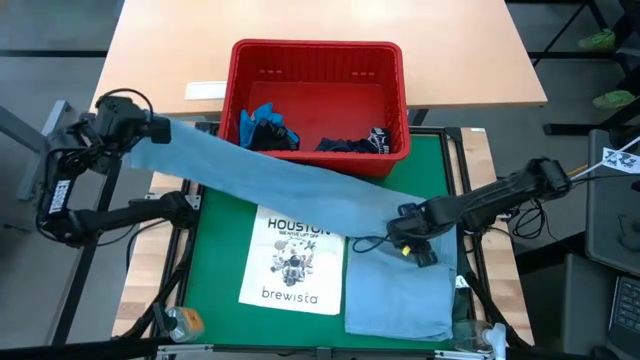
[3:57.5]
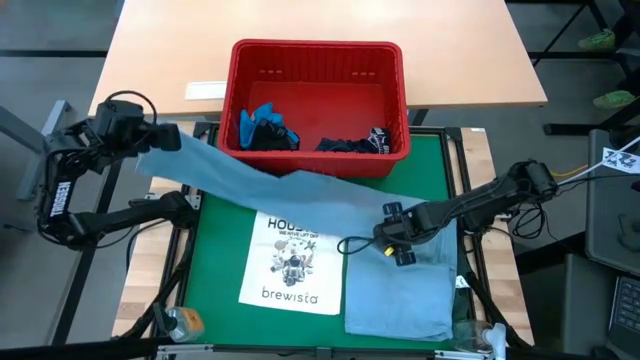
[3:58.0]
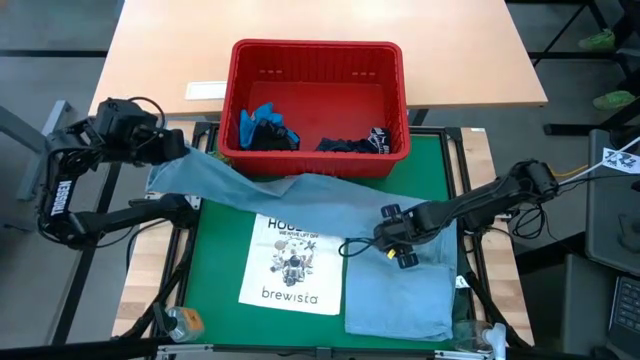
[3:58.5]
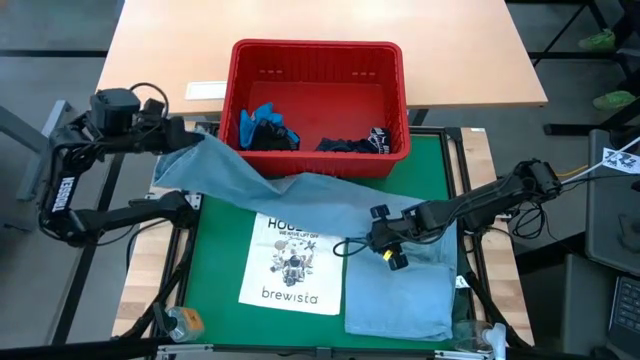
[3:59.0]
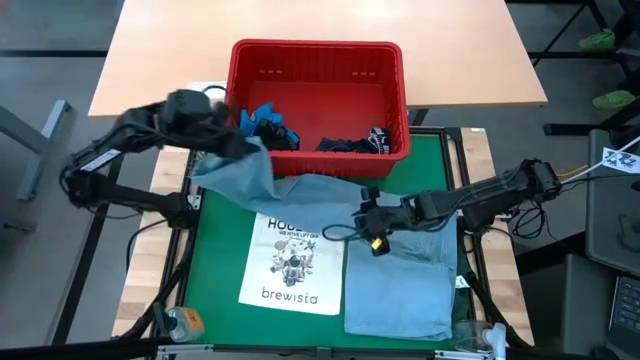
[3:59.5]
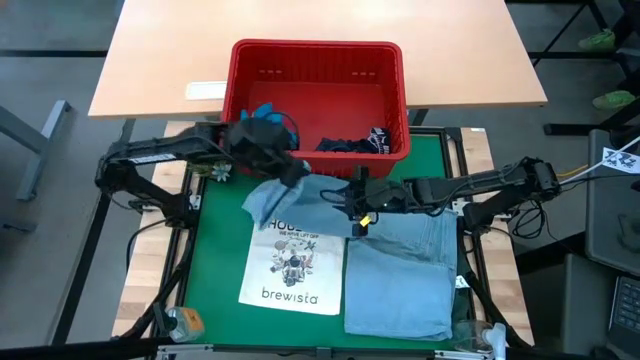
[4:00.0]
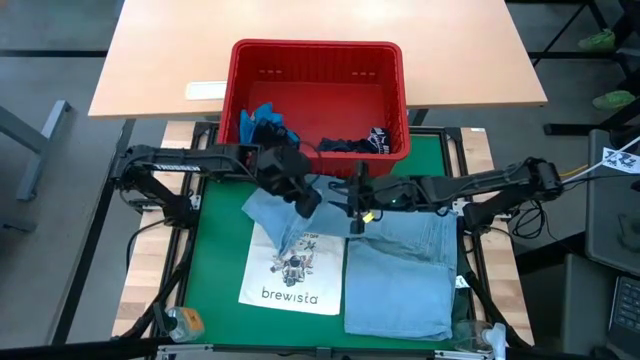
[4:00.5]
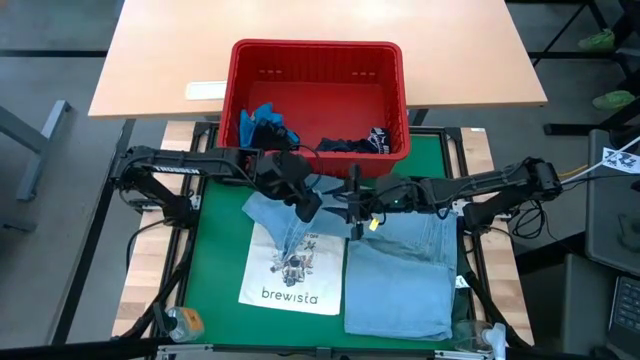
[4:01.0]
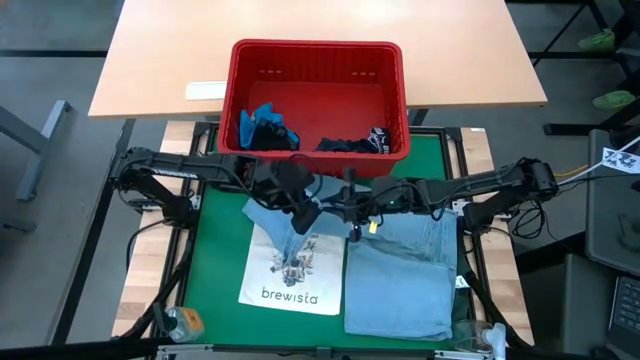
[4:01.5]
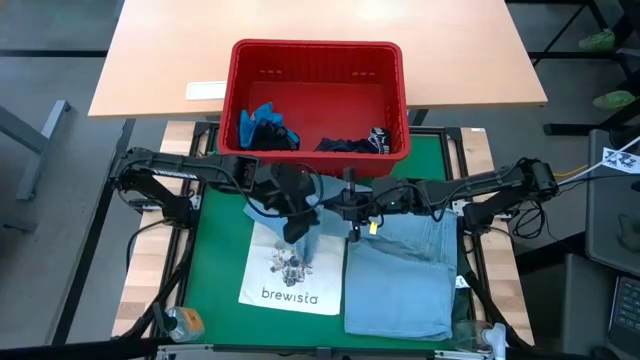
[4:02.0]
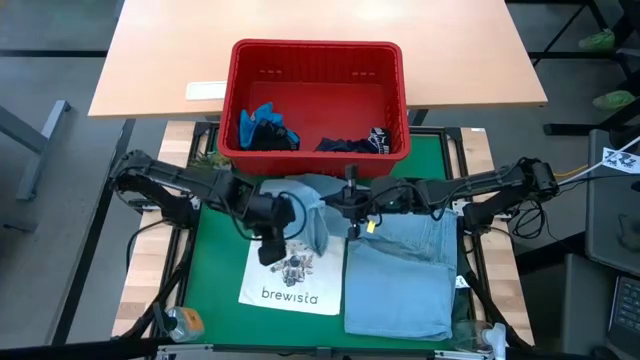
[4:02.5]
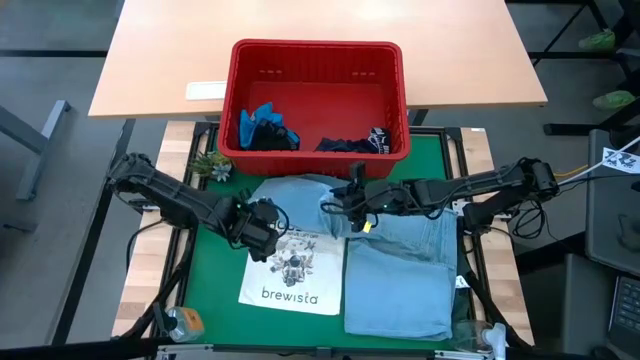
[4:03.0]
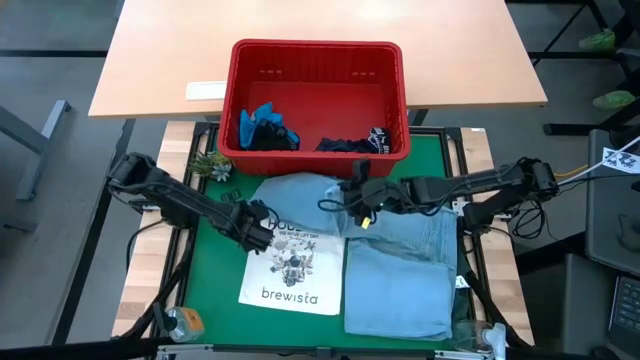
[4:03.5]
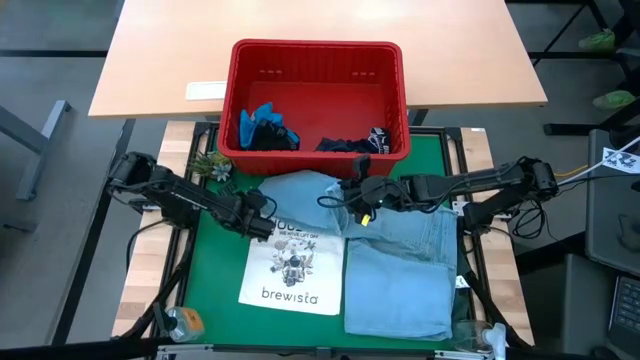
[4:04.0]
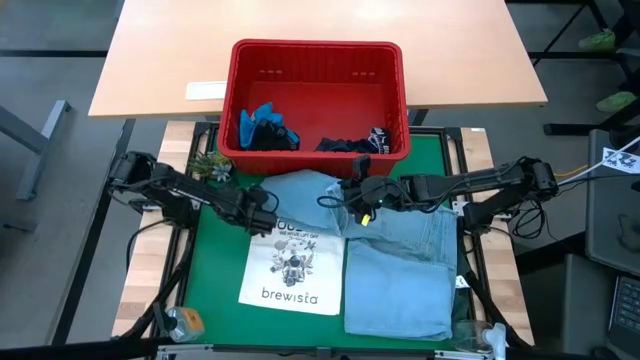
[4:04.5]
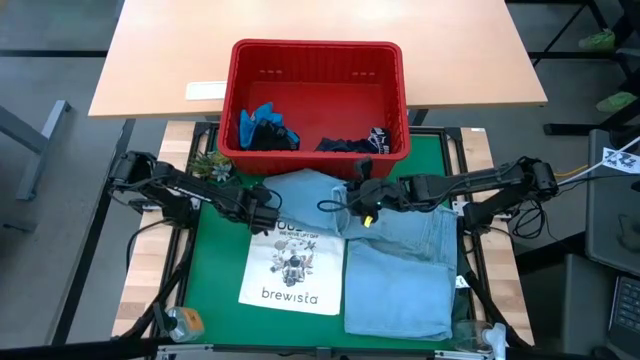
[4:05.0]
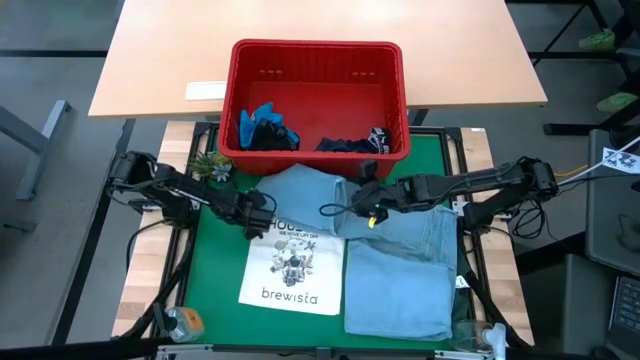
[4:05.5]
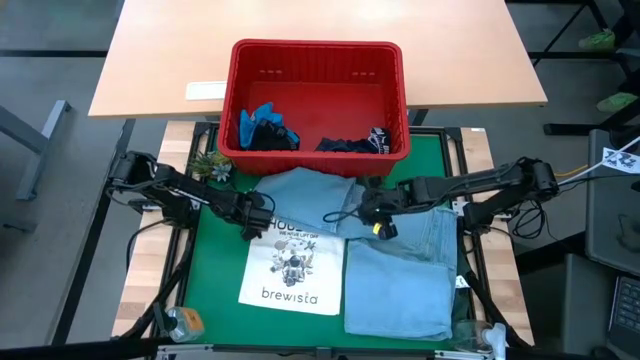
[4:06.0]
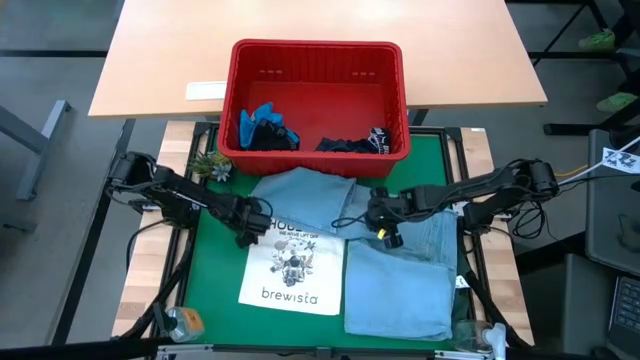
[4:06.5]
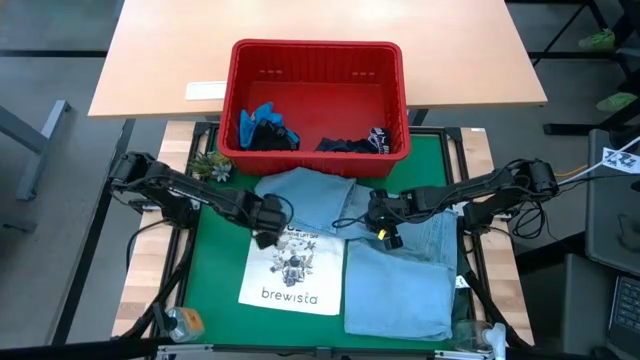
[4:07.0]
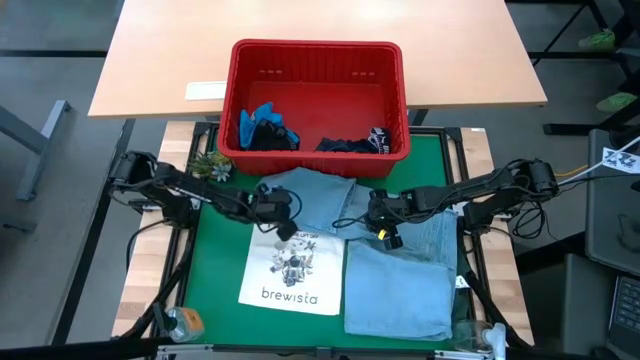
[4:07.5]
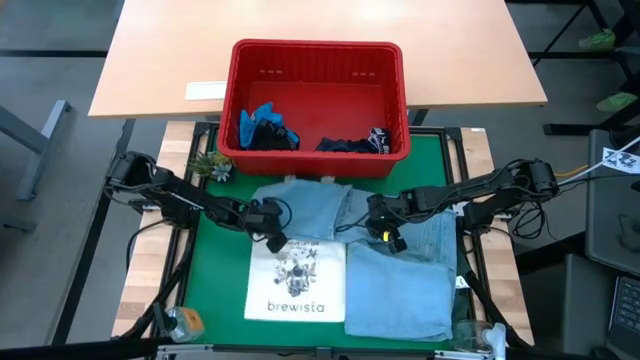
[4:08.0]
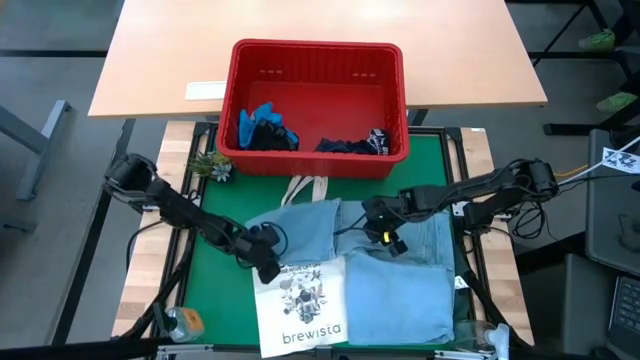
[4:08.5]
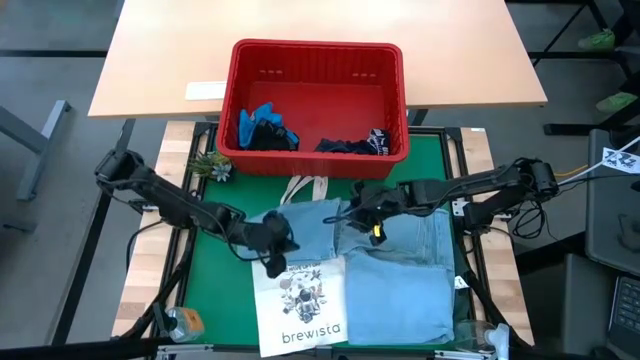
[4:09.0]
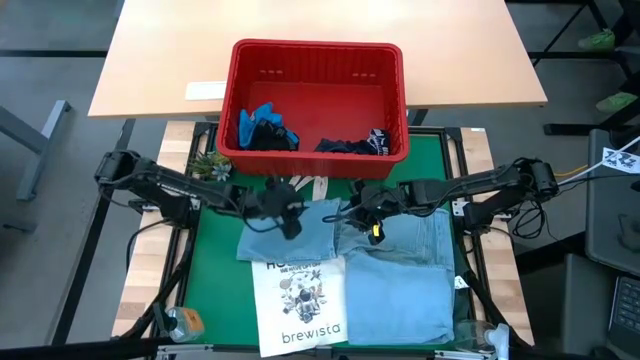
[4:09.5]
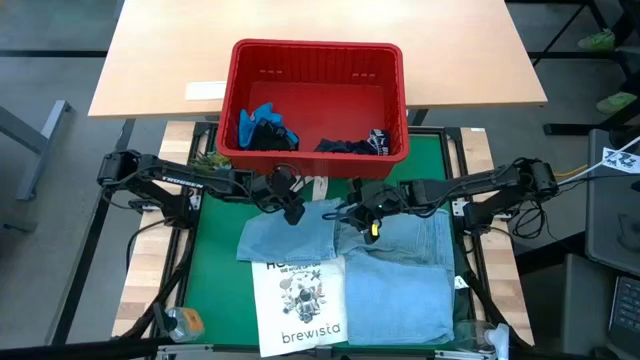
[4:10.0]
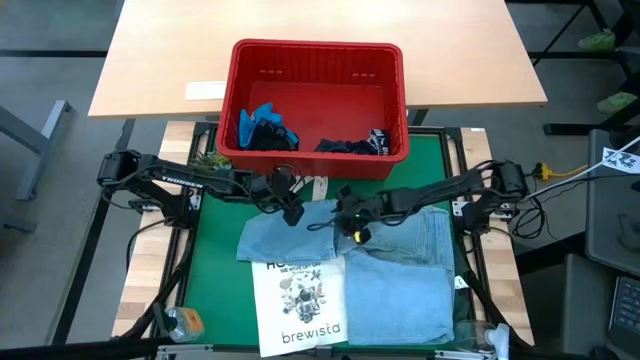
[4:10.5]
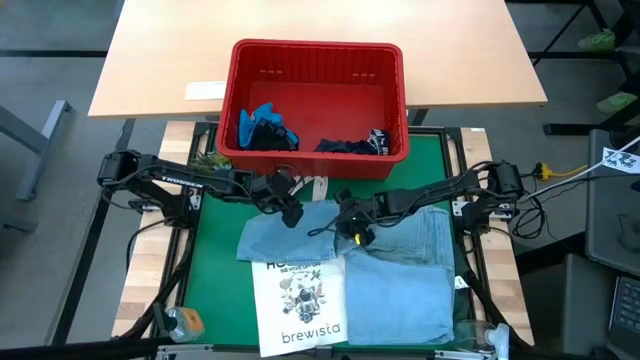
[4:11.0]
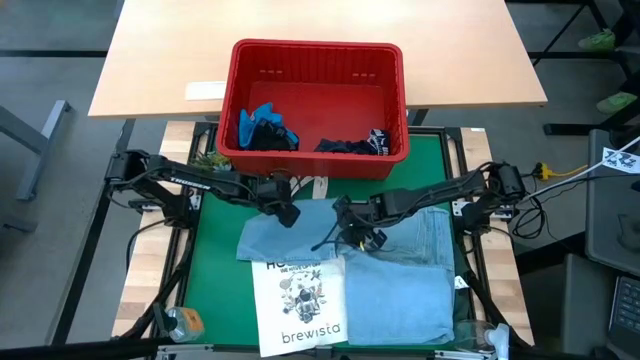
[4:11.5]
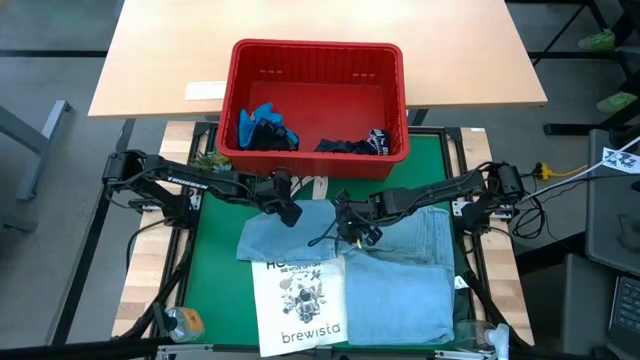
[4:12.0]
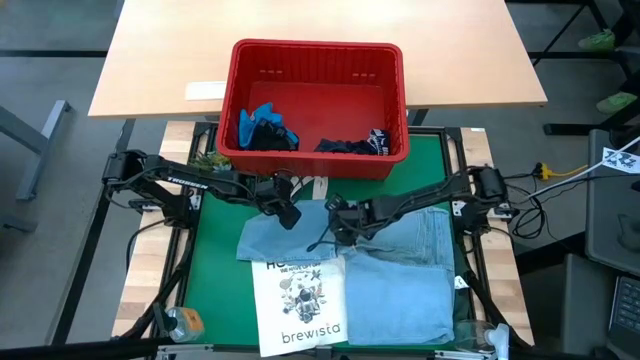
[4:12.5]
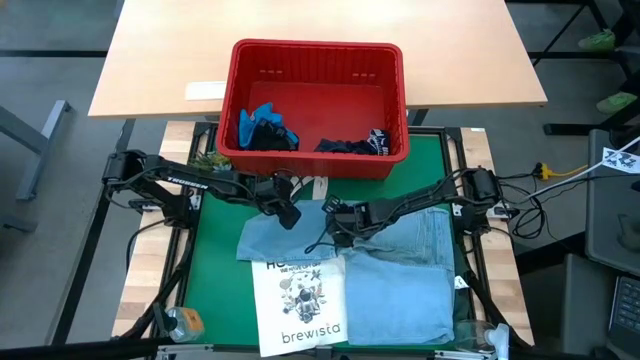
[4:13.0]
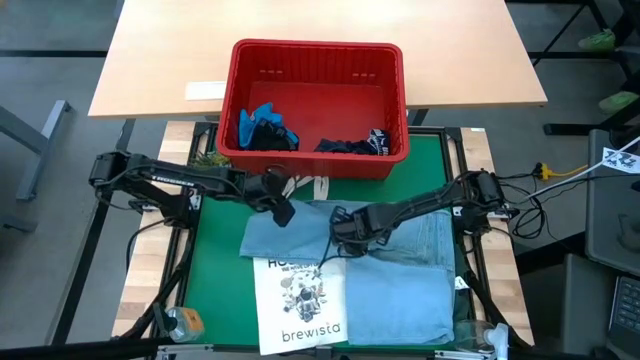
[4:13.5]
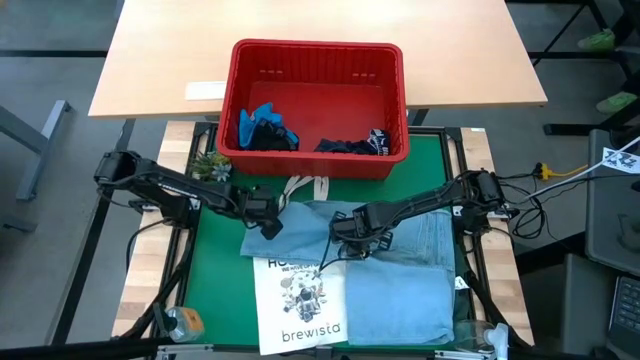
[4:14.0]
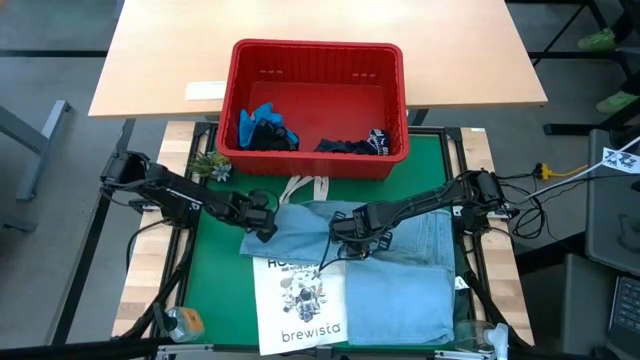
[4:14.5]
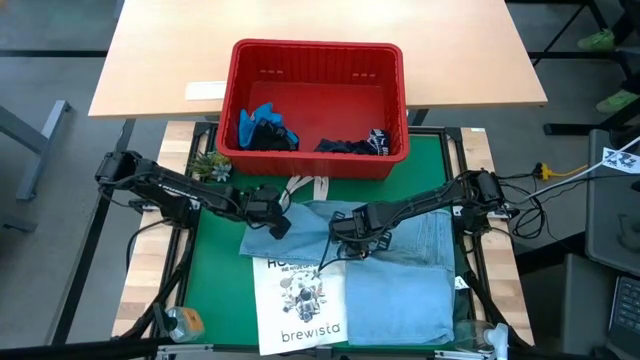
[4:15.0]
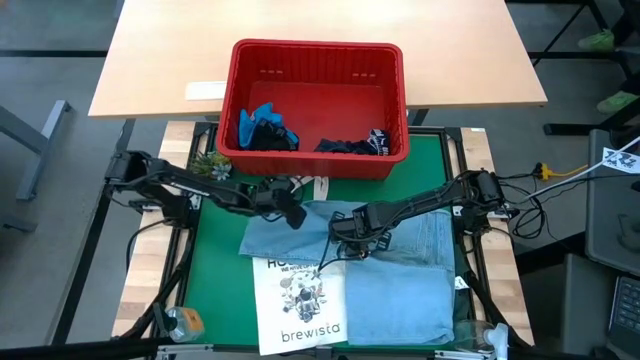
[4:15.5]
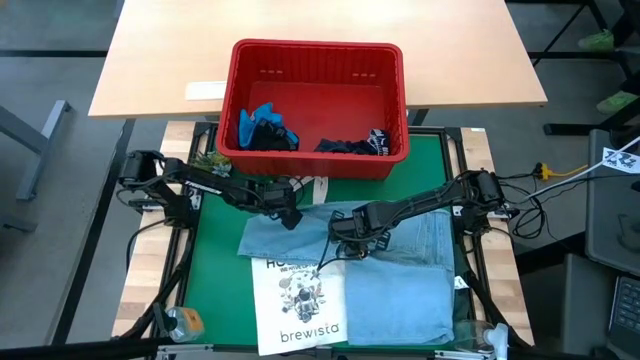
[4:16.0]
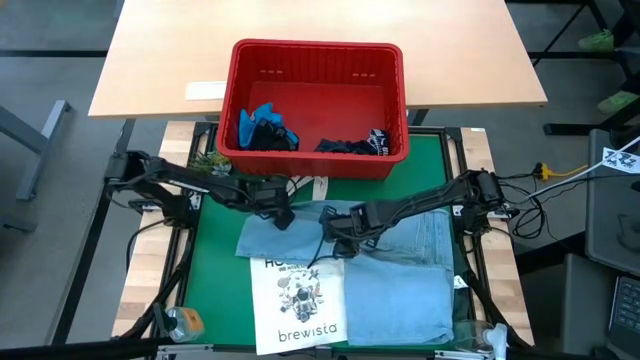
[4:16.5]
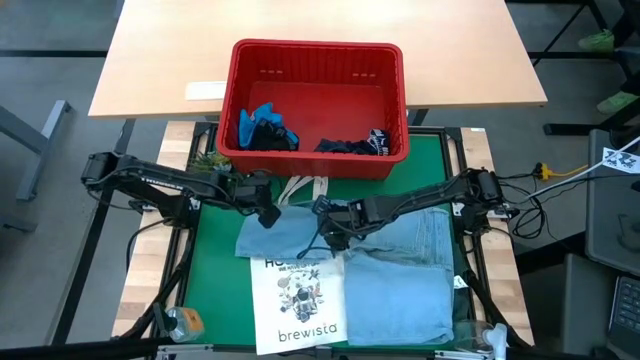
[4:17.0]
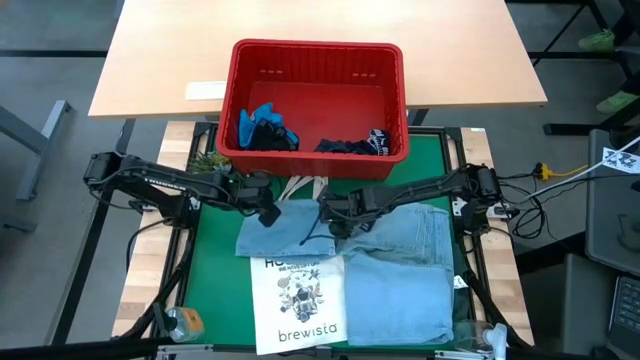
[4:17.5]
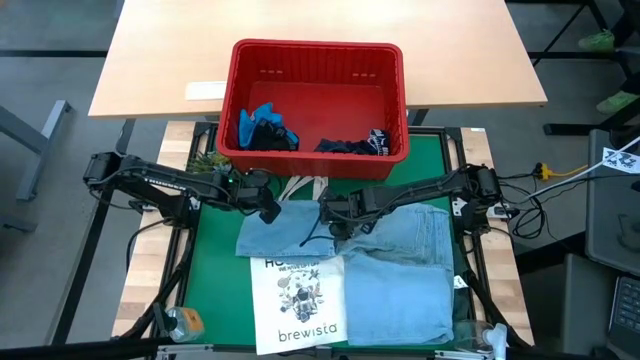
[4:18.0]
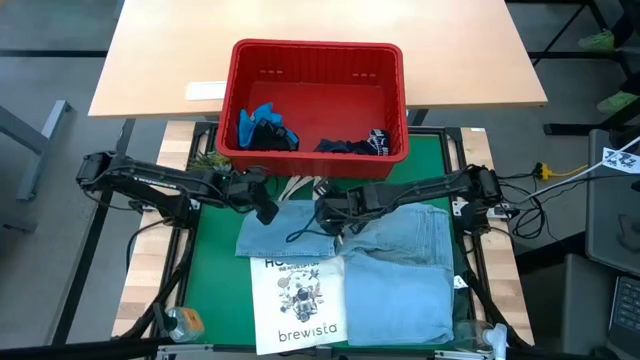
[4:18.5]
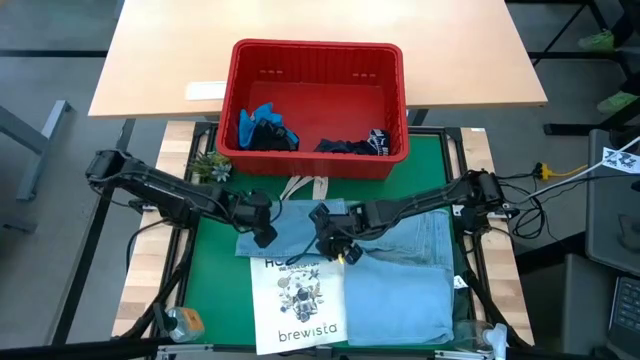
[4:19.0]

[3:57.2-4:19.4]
Task: Fold Laundry from Bin
Fold the light blue jeans
